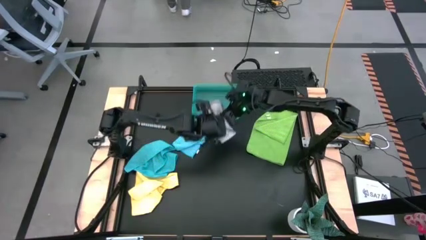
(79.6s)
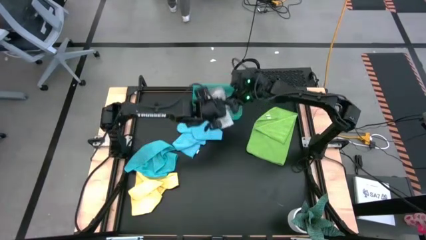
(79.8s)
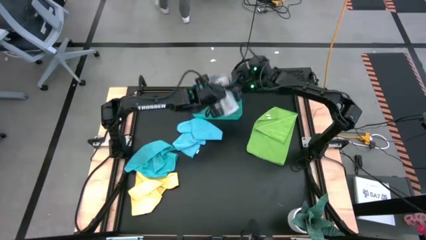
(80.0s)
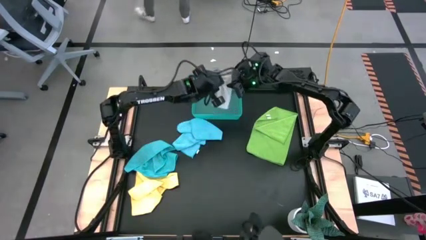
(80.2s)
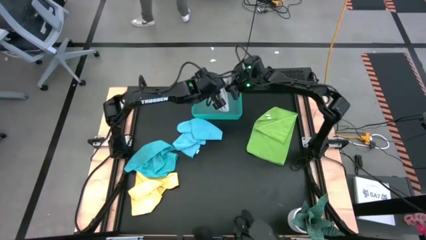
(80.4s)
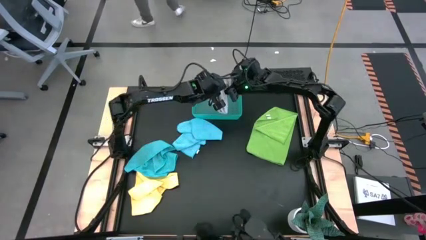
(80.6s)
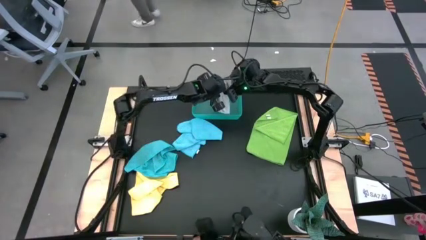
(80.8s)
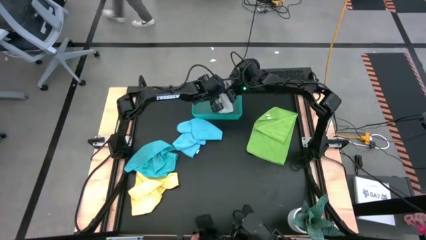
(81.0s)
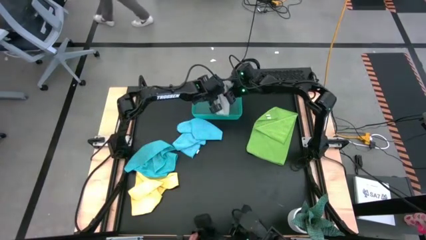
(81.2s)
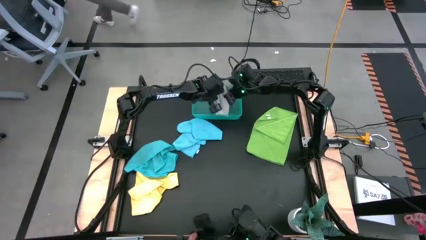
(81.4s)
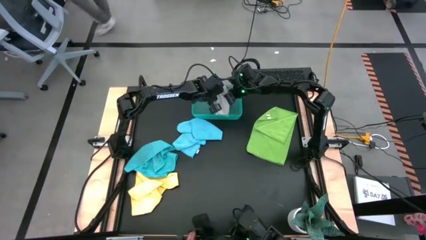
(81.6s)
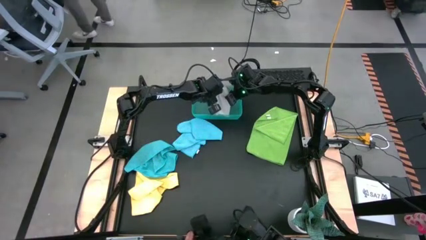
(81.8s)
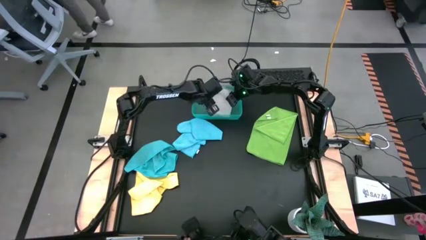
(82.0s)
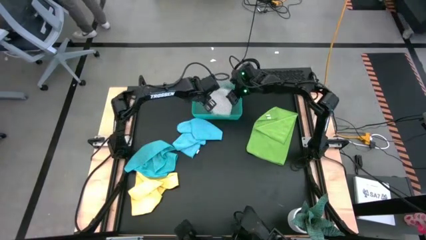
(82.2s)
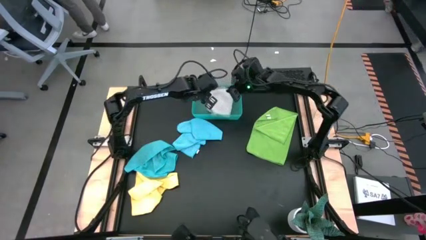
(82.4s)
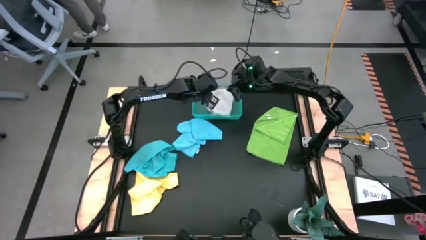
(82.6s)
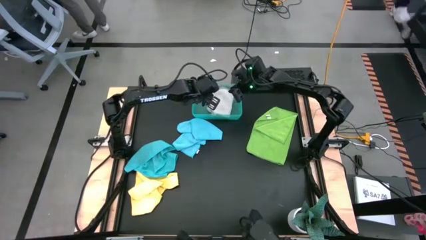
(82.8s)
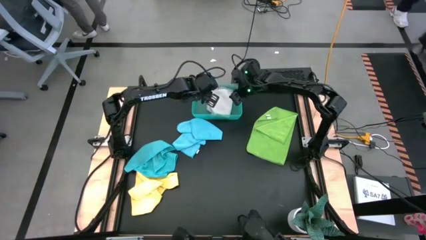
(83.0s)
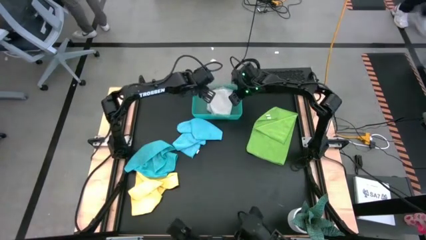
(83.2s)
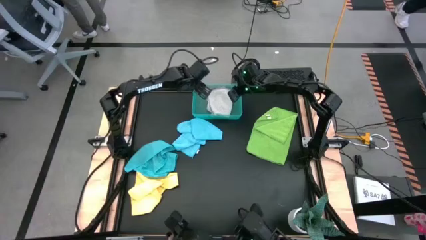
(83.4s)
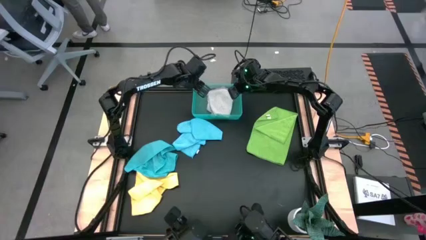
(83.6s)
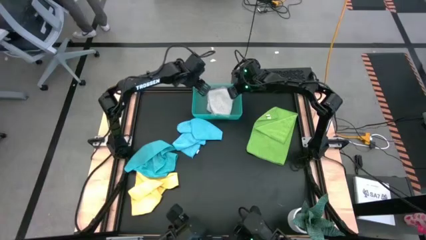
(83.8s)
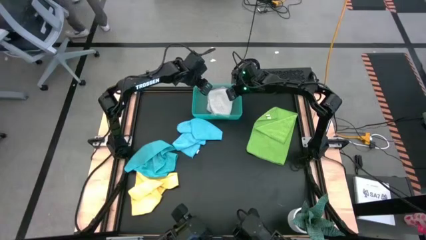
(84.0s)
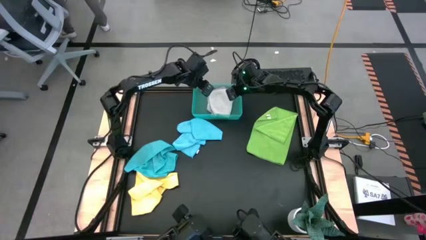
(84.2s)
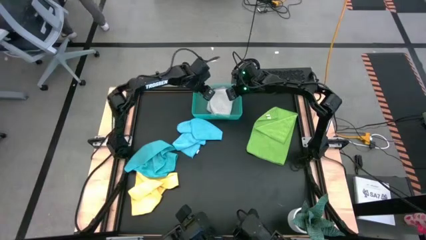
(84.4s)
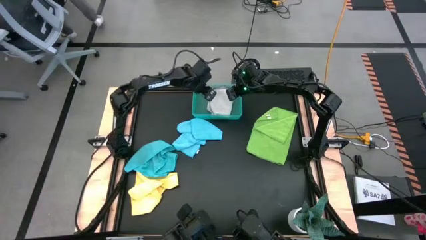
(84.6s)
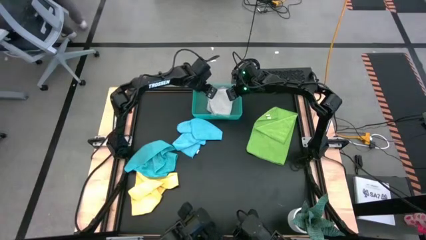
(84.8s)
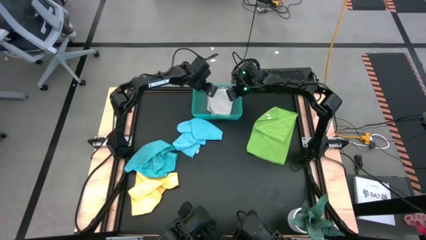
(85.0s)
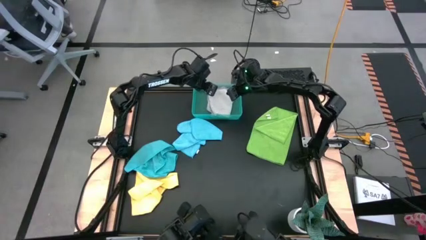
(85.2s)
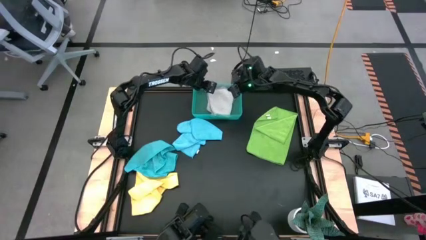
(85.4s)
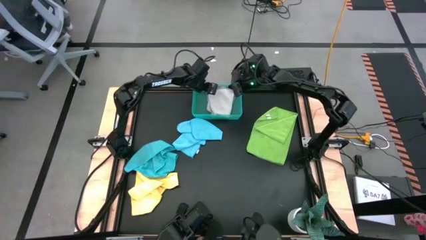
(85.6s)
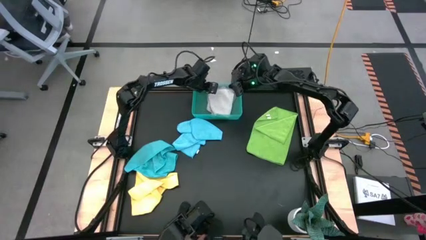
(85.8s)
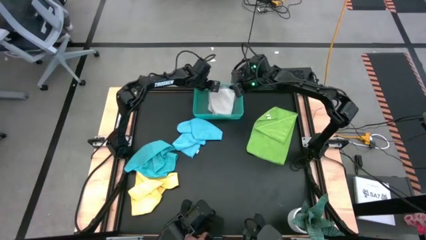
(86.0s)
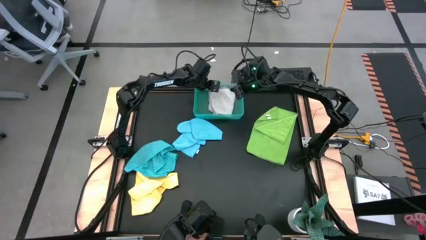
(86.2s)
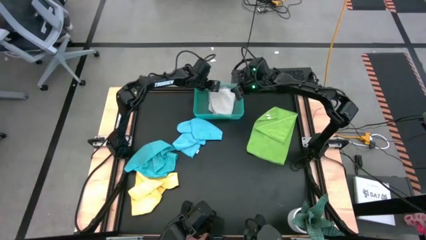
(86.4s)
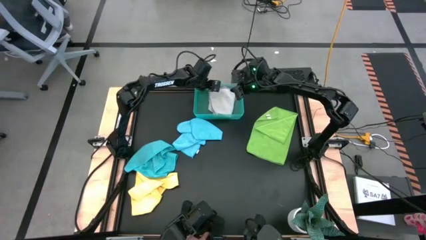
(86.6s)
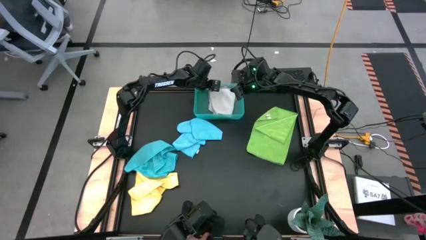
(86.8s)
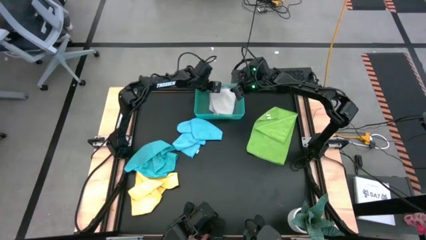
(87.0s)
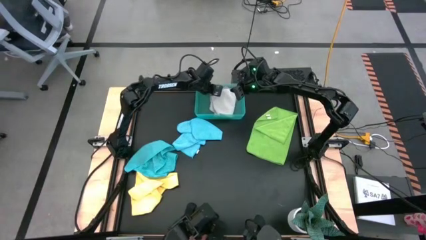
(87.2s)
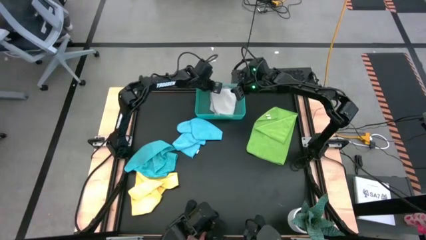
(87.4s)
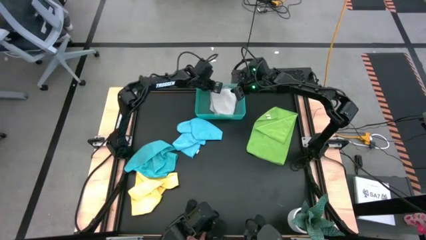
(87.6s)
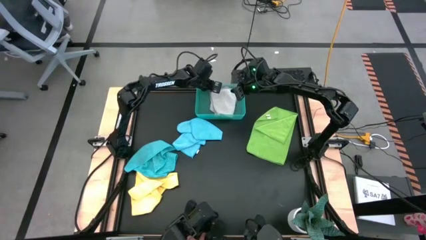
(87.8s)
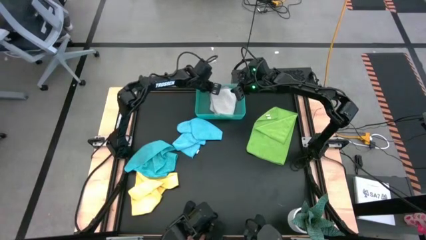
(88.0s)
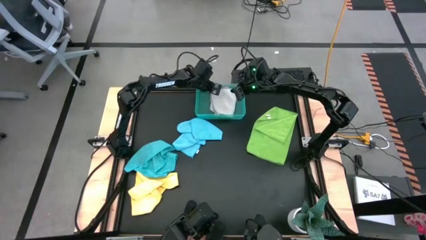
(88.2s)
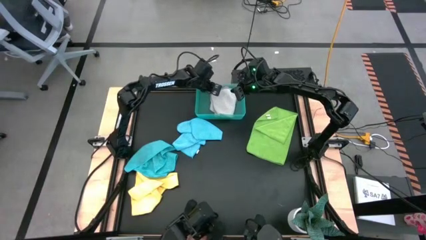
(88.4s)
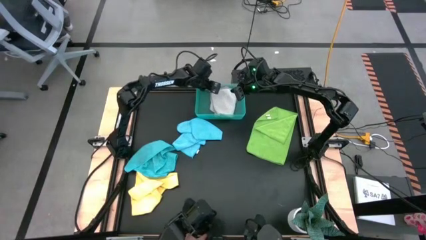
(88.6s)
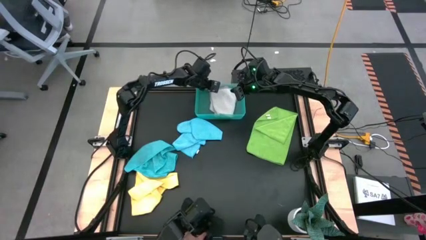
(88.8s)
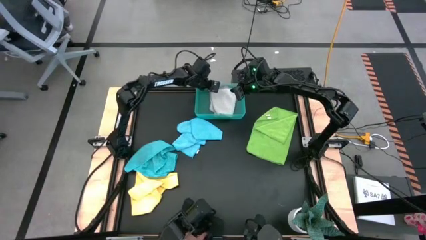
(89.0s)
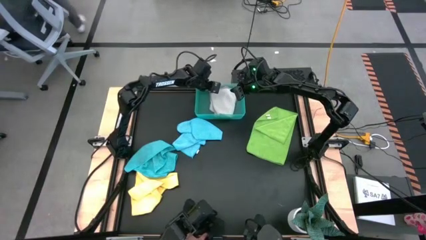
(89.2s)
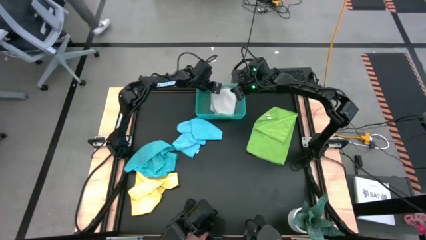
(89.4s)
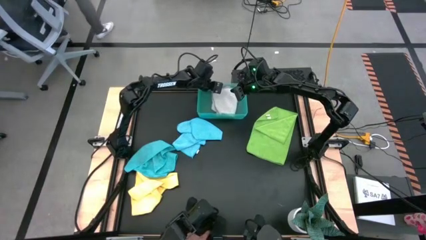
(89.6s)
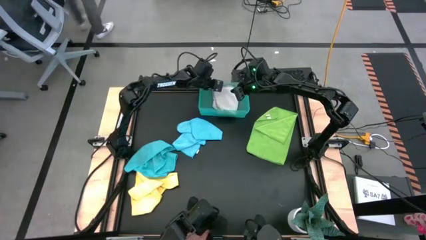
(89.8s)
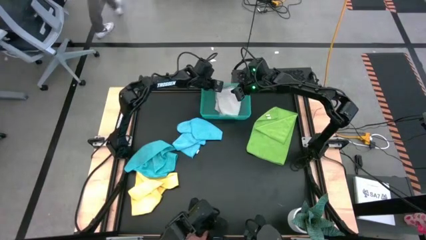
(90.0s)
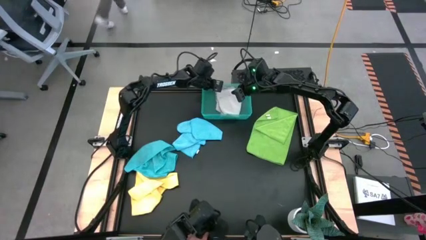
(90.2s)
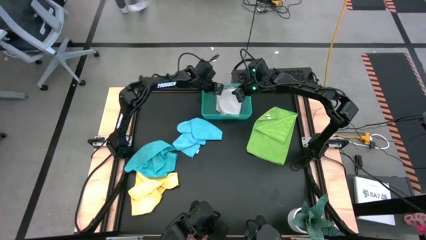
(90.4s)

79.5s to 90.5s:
Task: Fold microfiber towels
Put the gray microfiber towel into the blue bin
